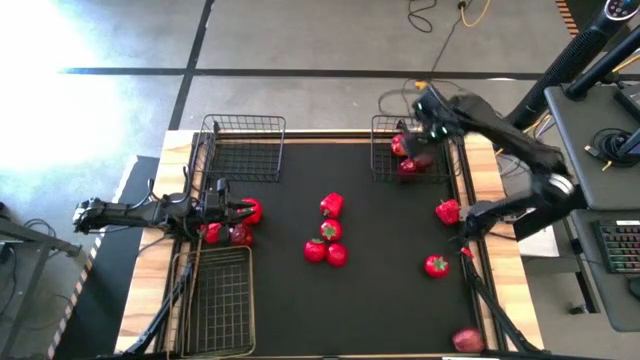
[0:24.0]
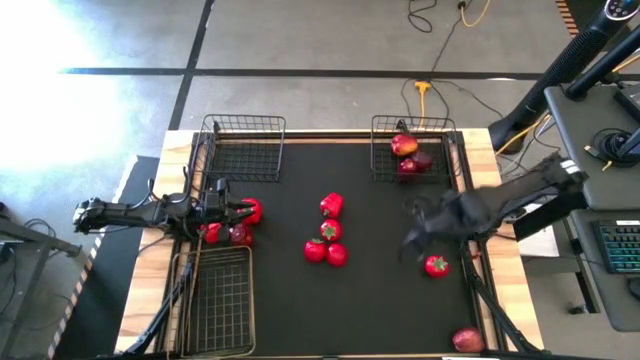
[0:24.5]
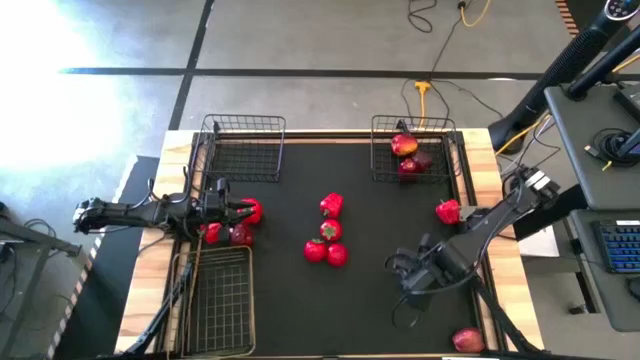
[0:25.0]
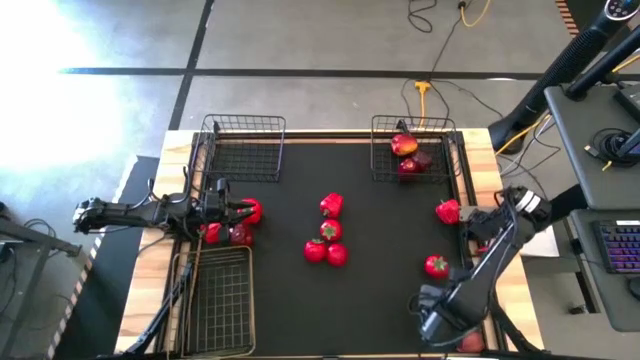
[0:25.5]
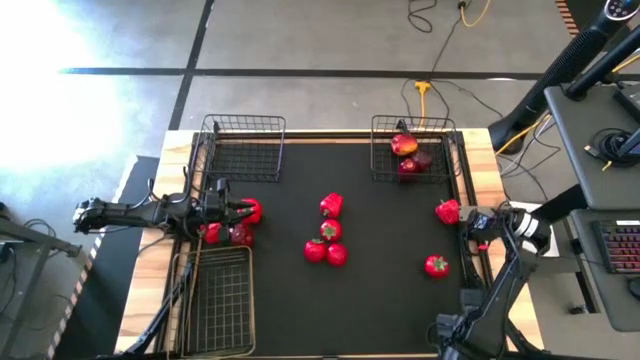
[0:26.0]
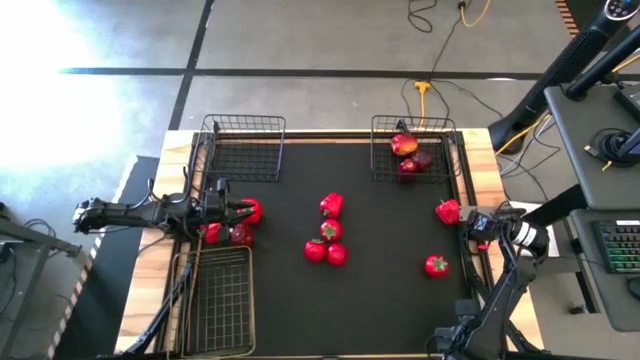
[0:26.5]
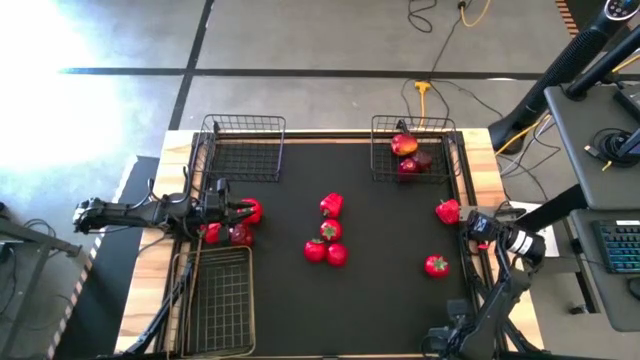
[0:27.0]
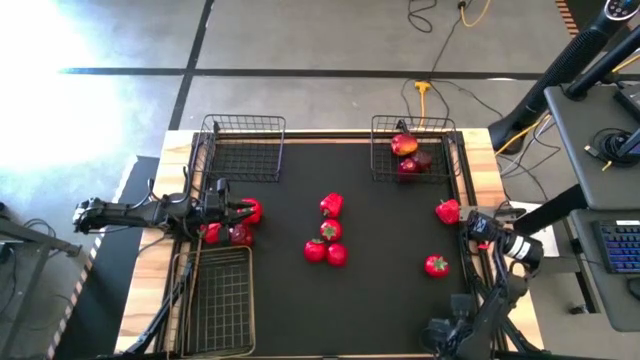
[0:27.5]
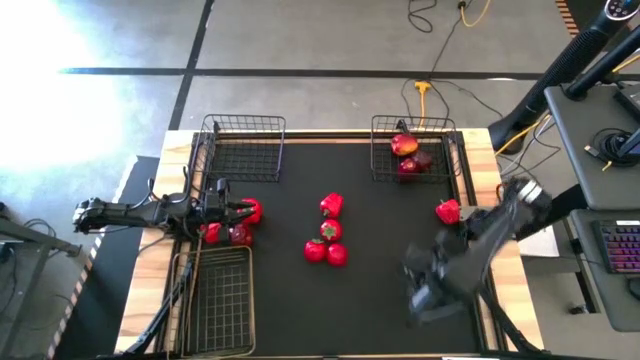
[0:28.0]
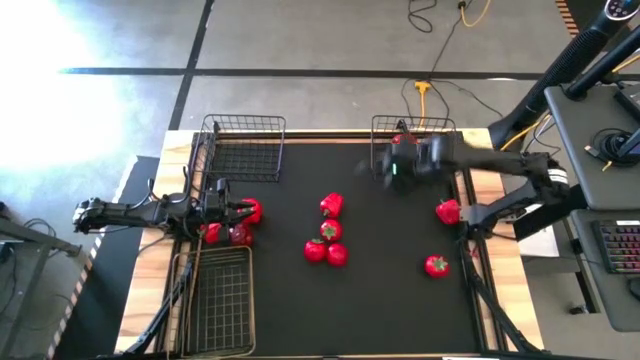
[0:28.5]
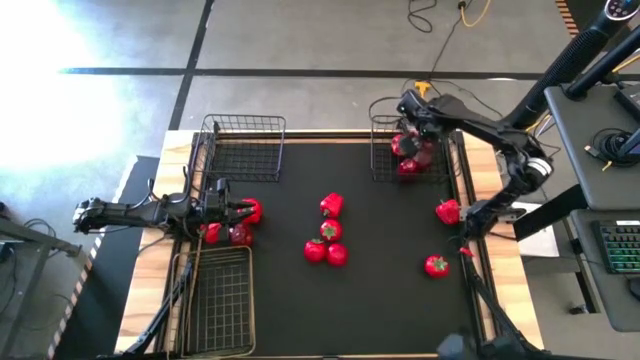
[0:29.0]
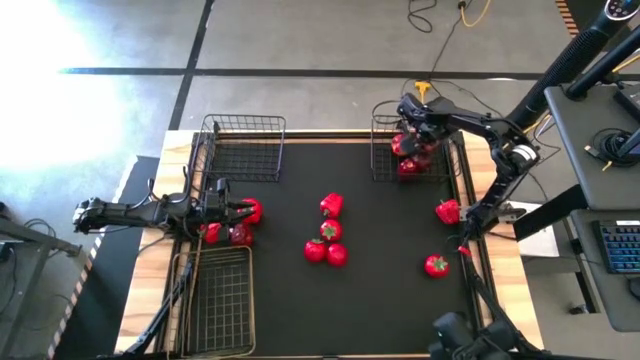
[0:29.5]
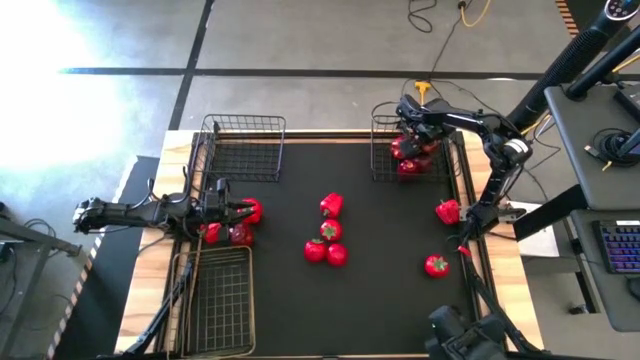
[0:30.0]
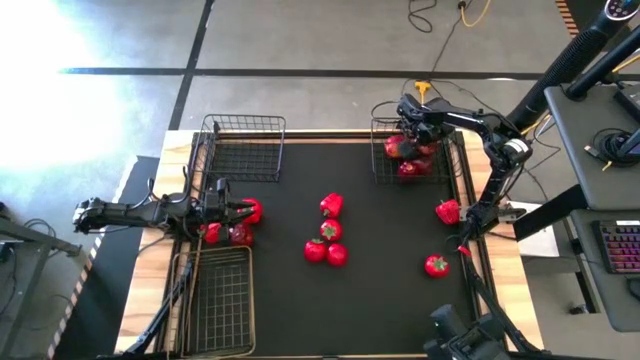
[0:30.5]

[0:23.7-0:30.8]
Task: Sort produce into baskets
Put the apple into the right black wire basket

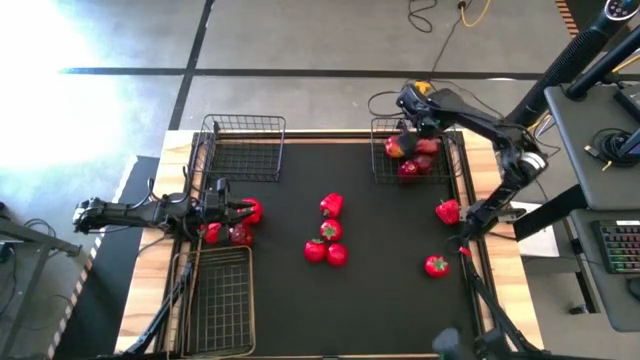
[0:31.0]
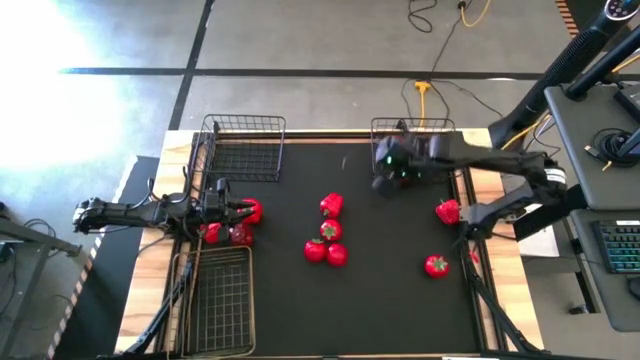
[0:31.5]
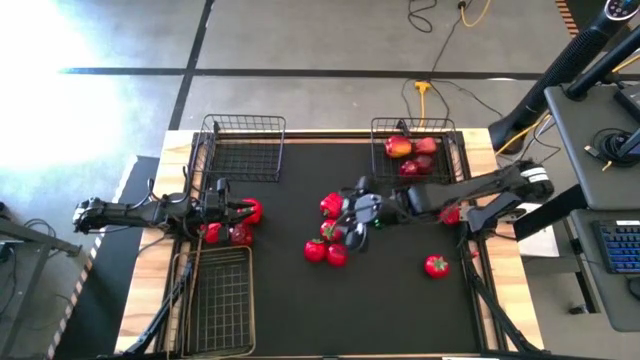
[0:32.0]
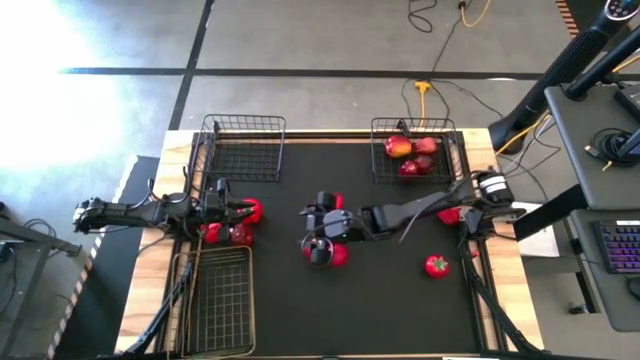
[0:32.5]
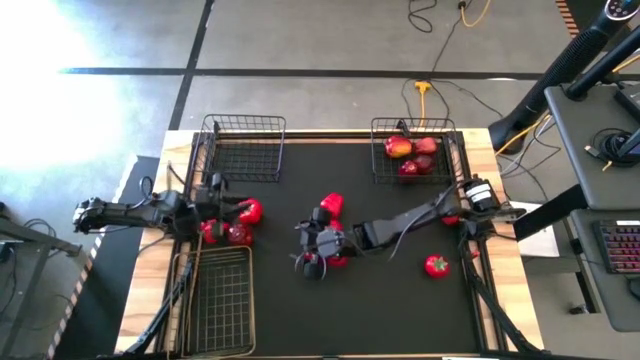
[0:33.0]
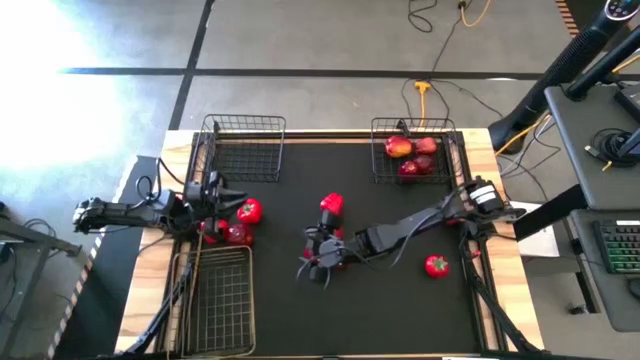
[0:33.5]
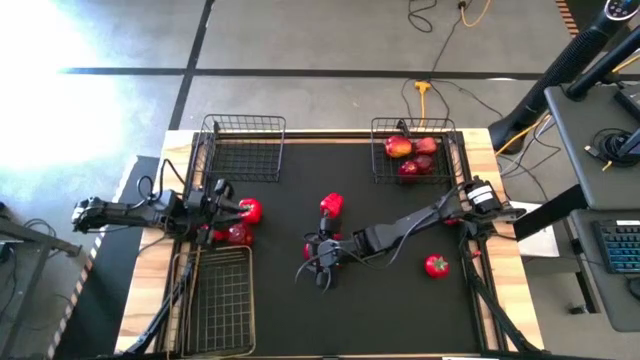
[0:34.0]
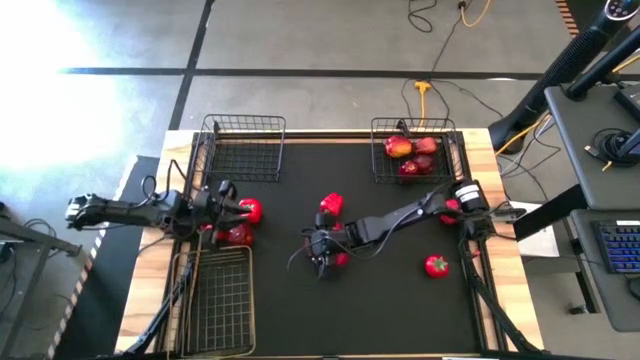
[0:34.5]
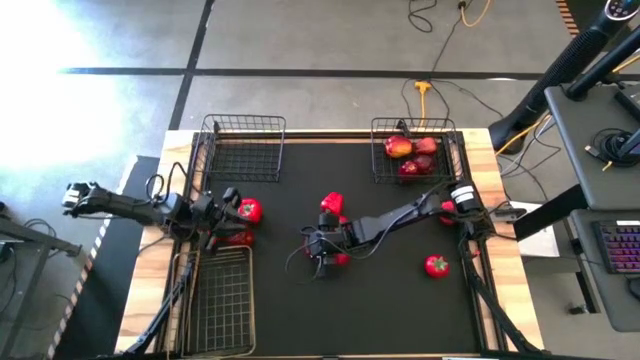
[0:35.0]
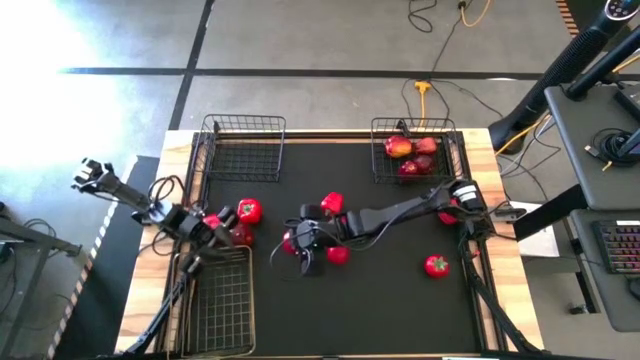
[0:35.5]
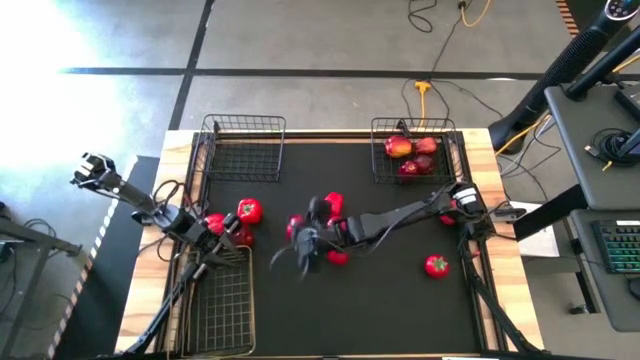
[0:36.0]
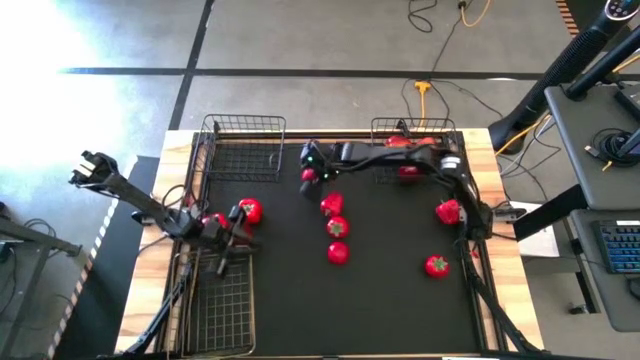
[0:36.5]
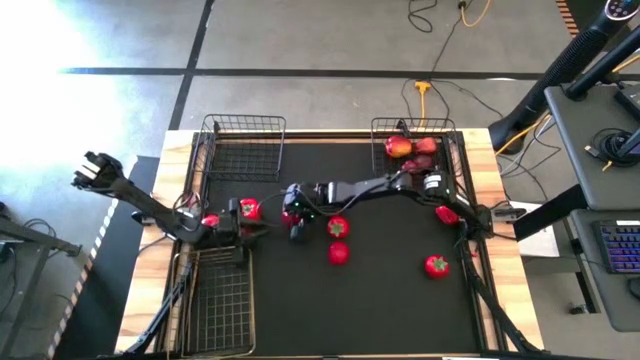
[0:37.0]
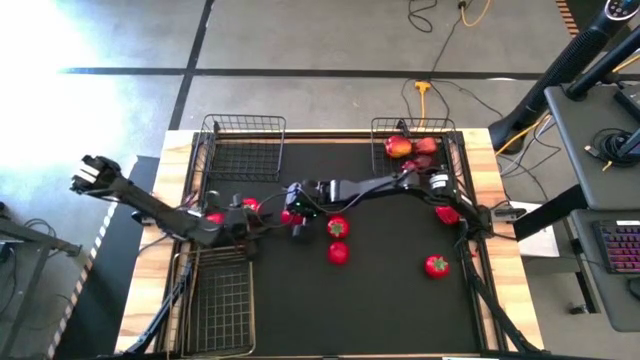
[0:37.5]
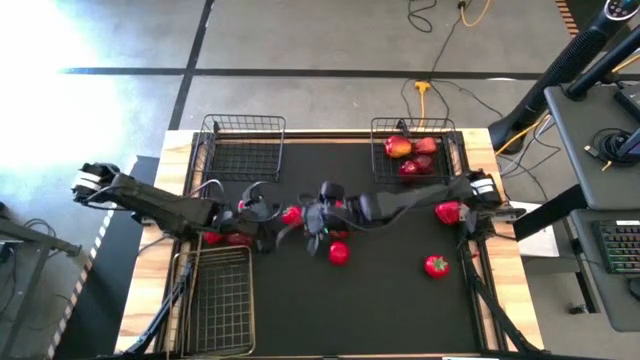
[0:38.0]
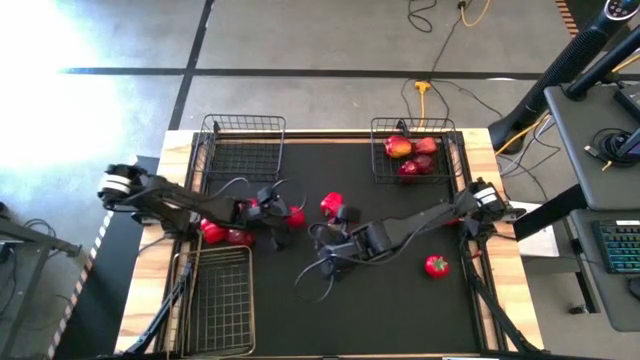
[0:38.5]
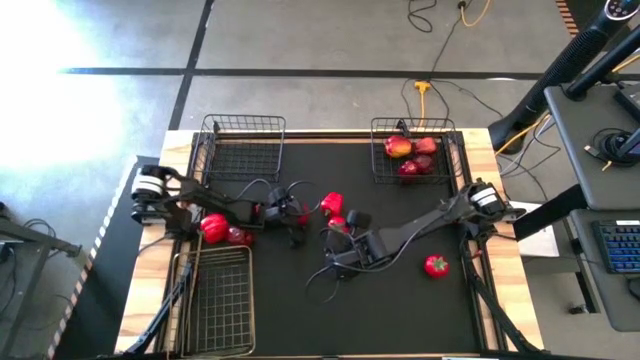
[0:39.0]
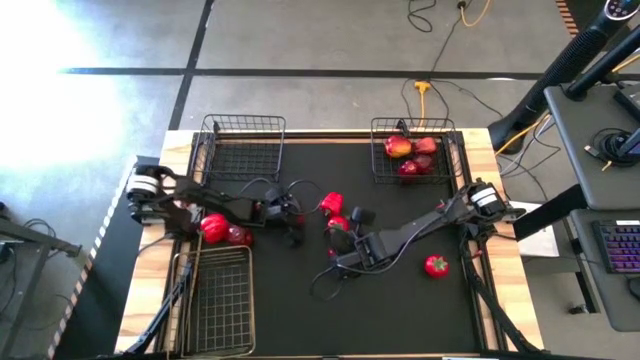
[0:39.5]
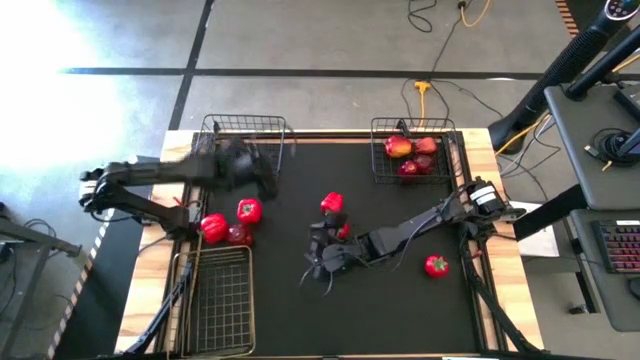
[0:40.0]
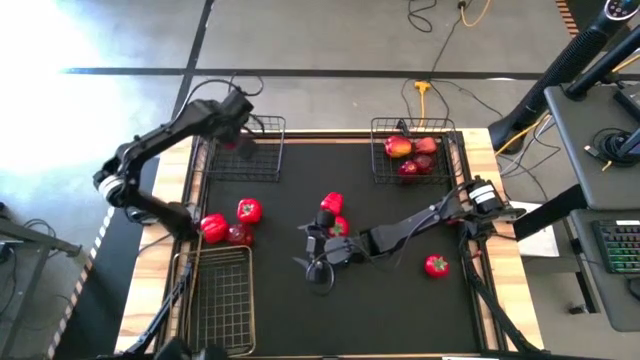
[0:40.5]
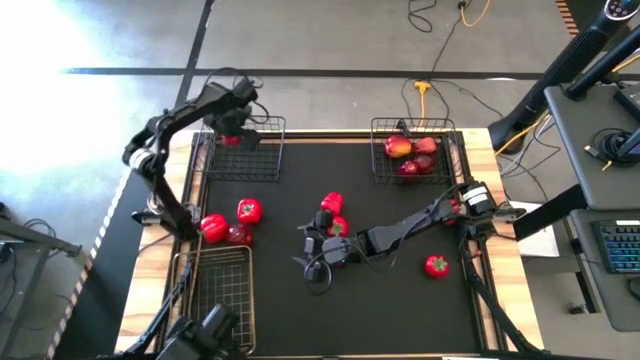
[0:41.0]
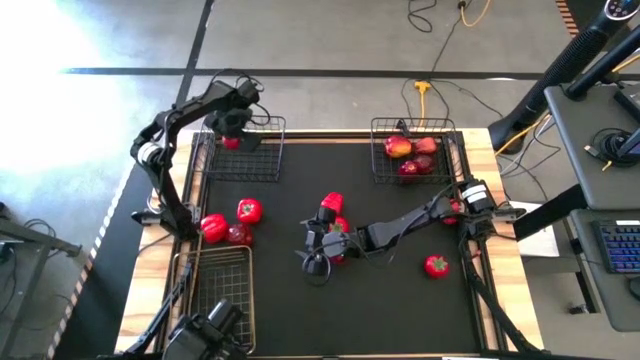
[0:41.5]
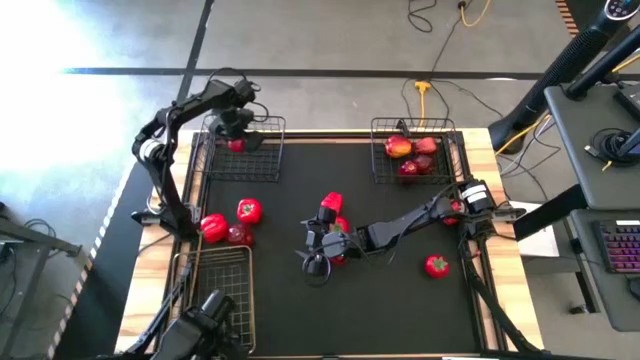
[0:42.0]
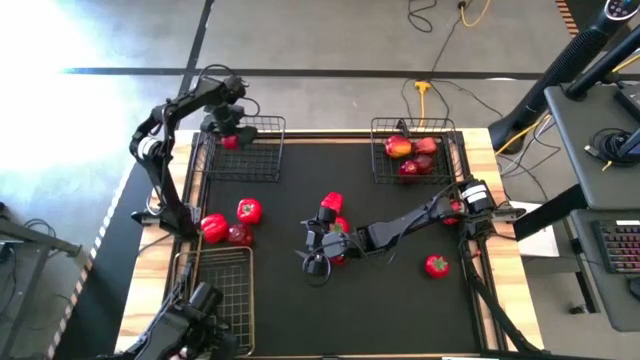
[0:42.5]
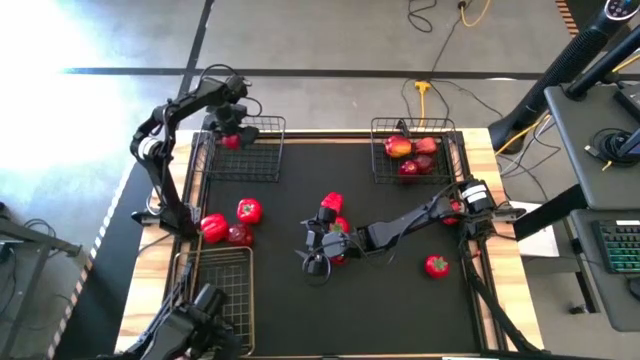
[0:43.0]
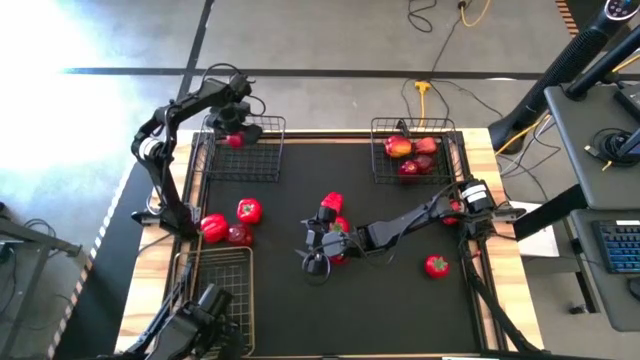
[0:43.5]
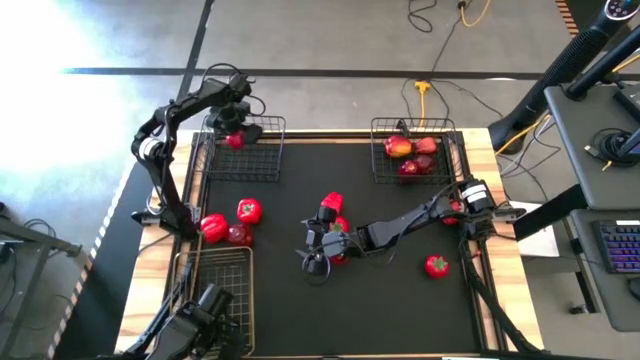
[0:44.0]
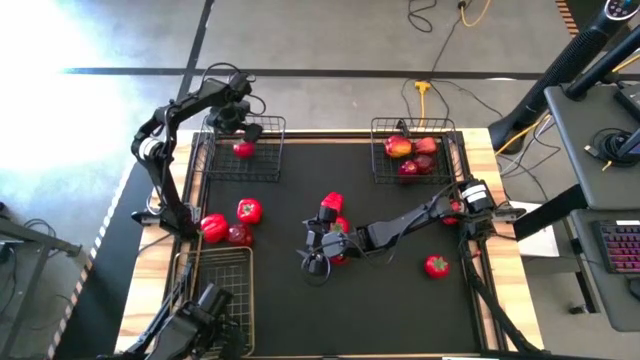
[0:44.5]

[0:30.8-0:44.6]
Put the tomato into the left black wire basket
